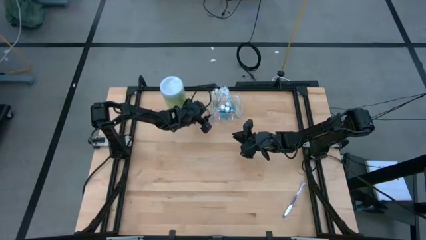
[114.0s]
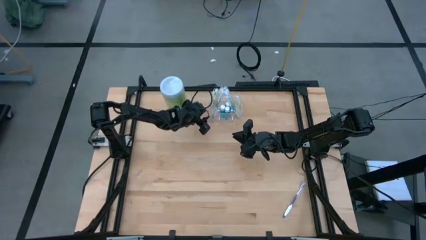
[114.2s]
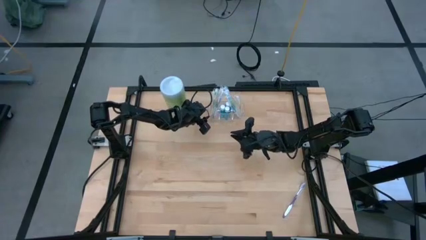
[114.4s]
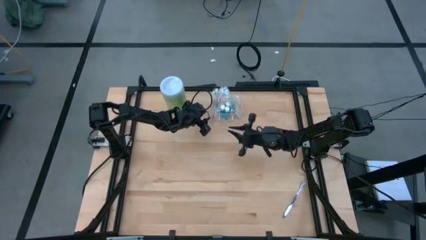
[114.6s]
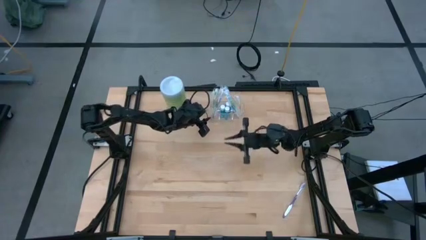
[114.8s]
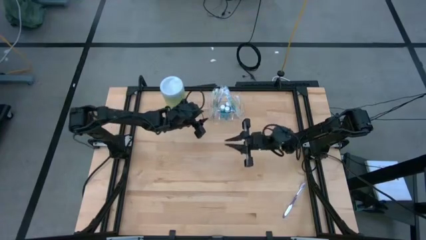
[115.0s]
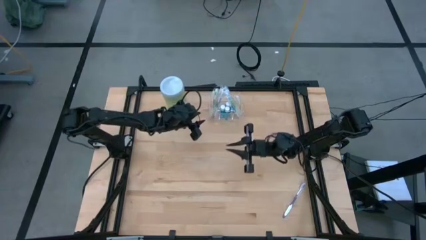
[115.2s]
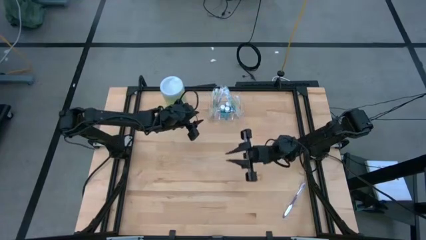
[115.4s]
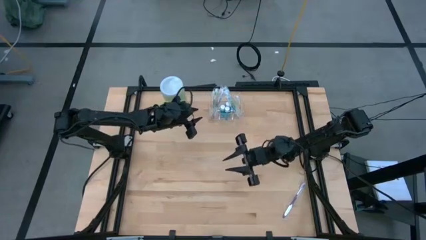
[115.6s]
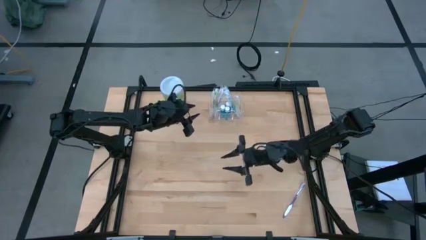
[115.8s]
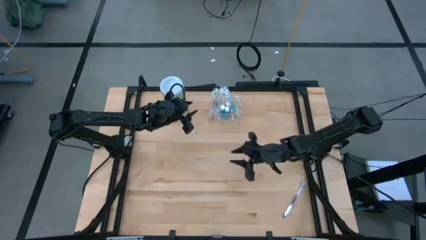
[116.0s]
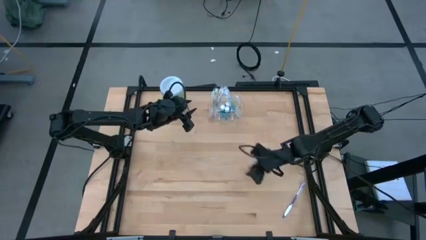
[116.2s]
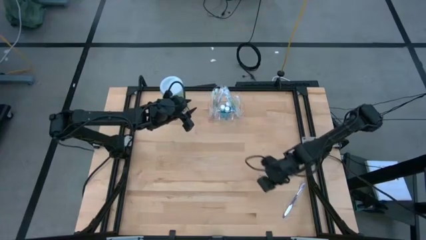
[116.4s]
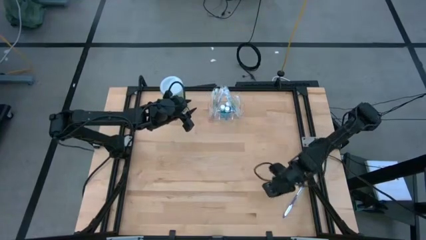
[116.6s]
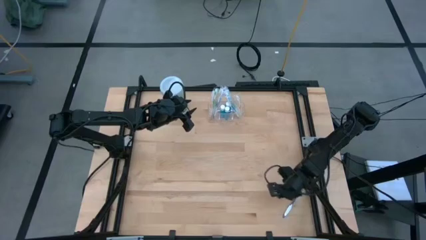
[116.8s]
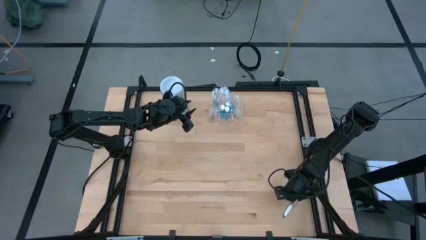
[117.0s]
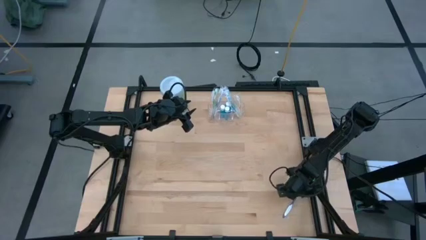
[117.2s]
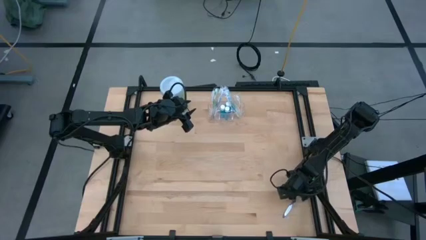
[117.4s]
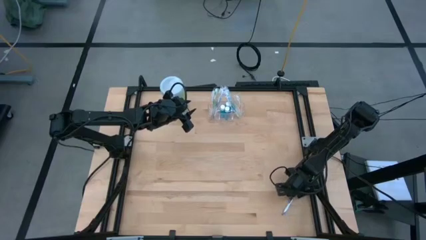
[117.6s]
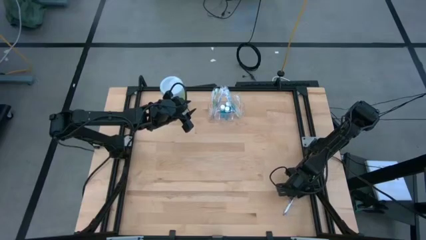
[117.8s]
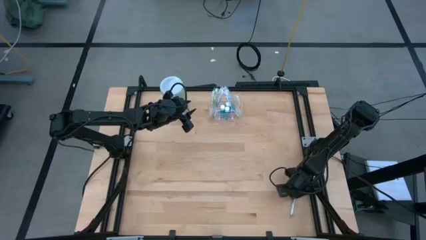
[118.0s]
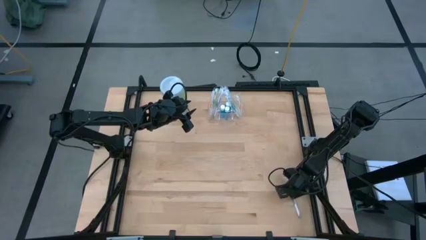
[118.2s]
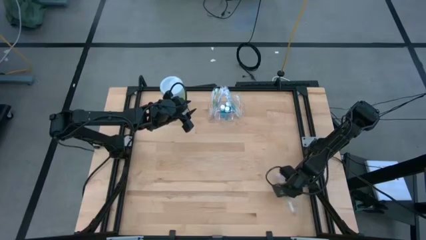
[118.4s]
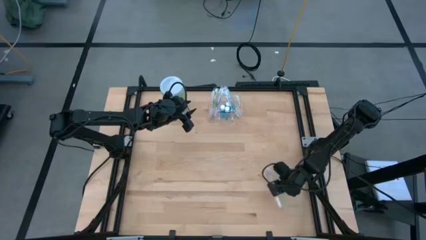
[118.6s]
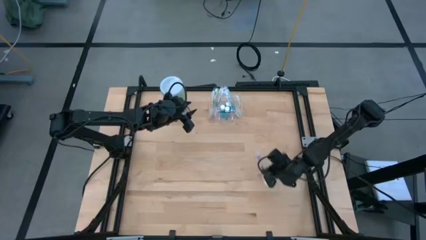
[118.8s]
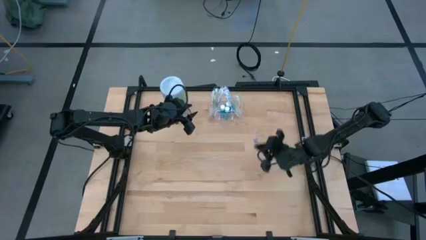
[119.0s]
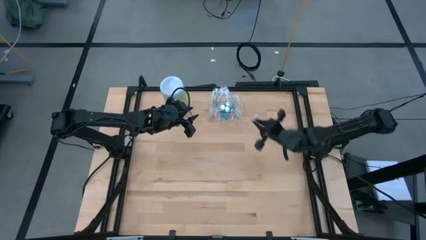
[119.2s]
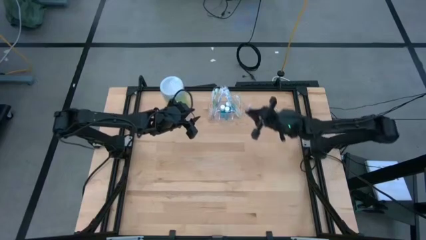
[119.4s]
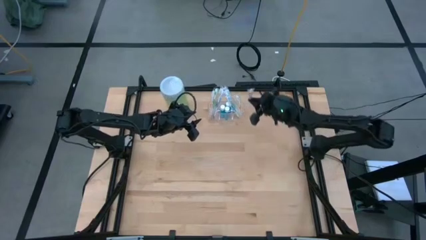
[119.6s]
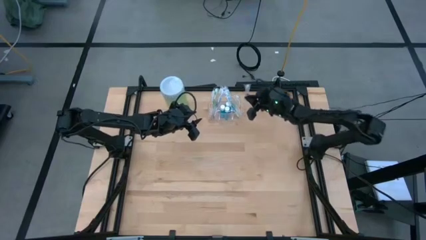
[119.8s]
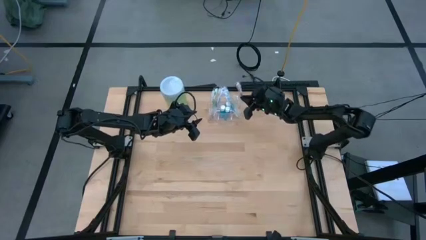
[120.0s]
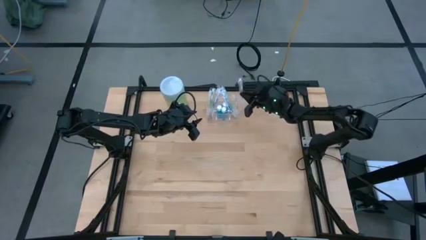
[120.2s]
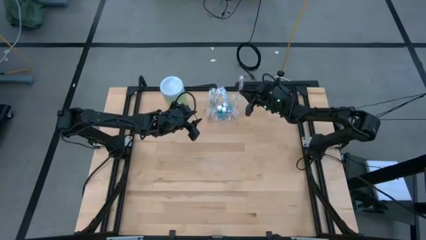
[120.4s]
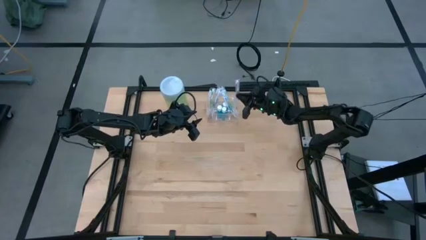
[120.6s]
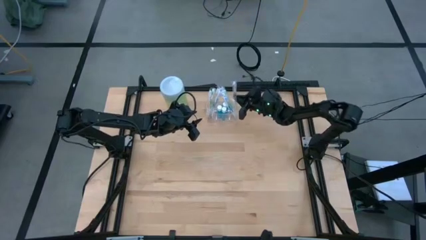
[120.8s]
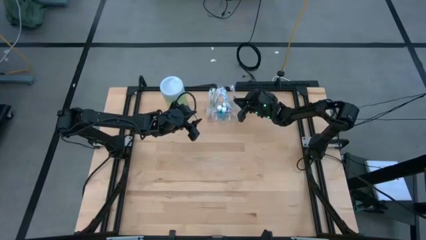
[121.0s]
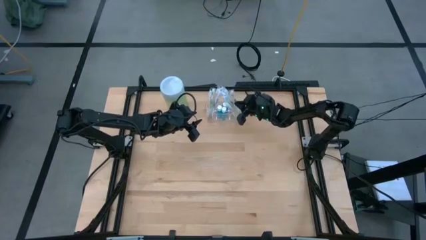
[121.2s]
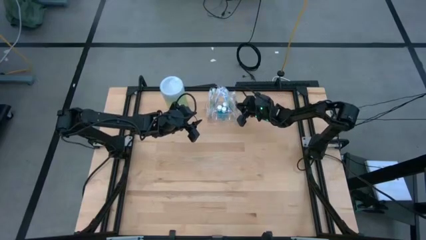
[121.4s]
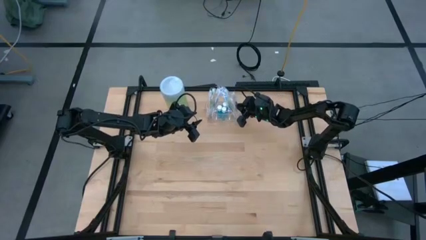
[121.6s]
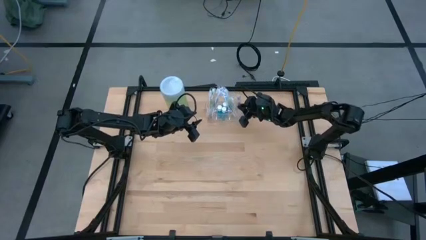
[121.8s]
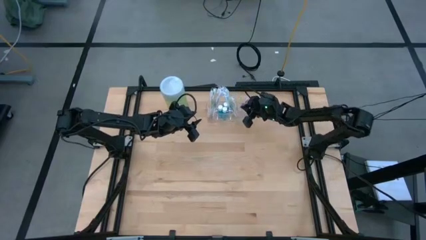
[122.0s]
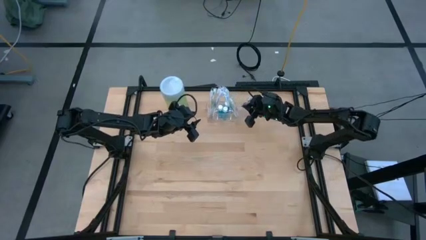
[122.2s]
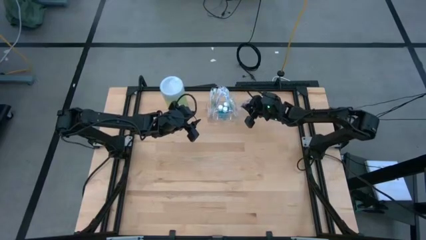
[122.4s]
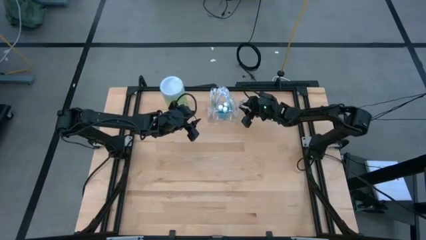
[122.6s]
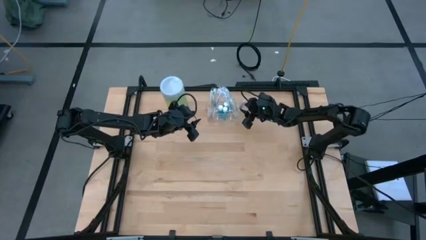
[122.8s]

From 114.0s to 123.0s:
Task: Pick & Place toothbrushing station
Put the purple toothbrush into the transparent organizer

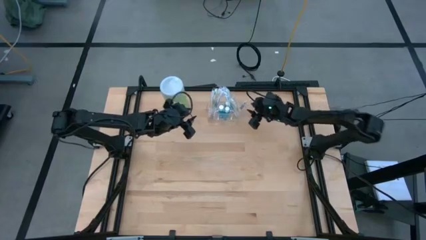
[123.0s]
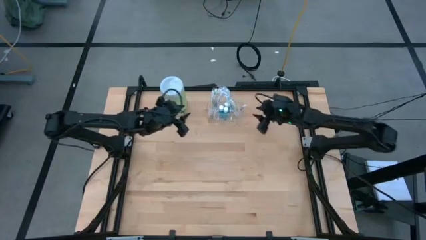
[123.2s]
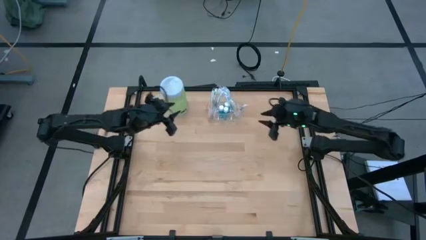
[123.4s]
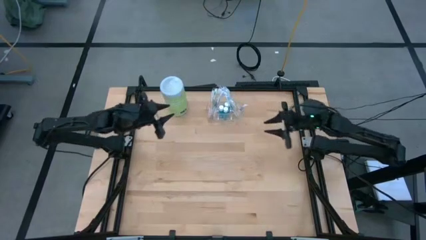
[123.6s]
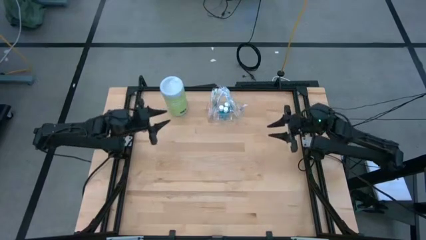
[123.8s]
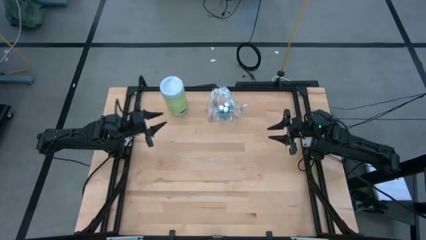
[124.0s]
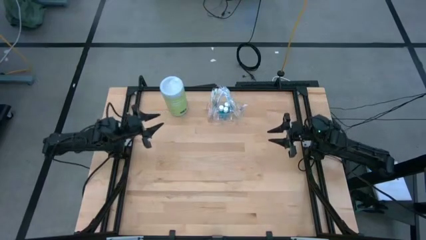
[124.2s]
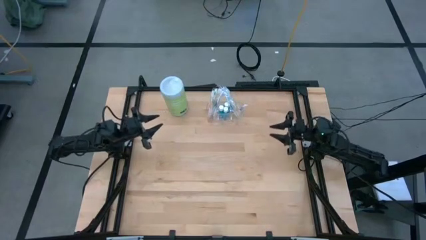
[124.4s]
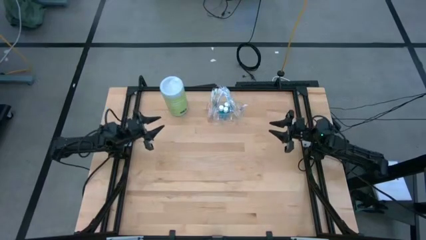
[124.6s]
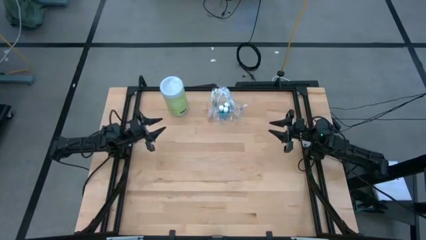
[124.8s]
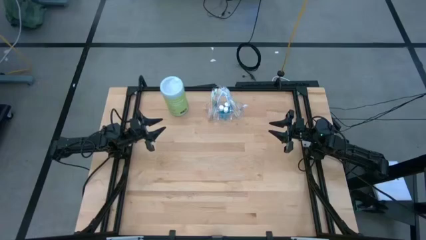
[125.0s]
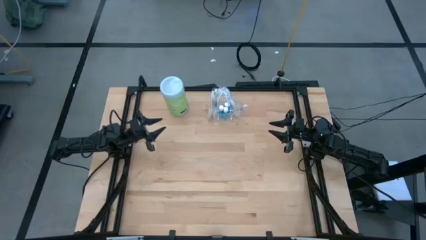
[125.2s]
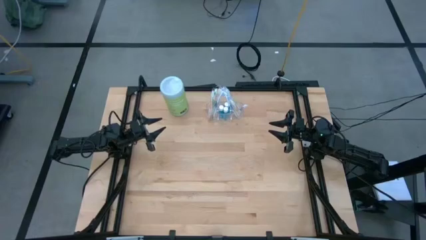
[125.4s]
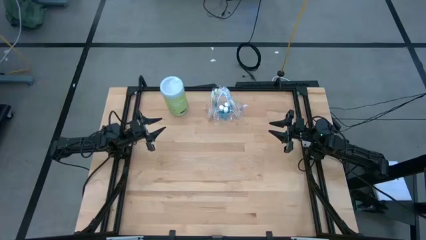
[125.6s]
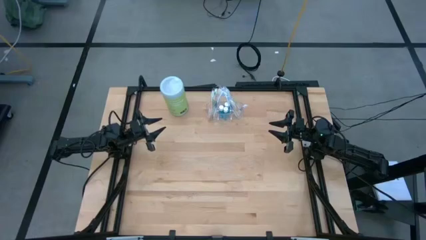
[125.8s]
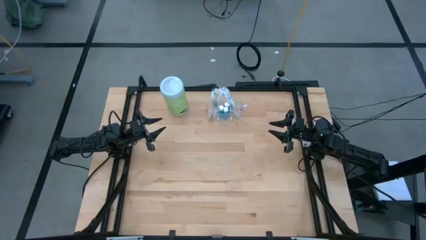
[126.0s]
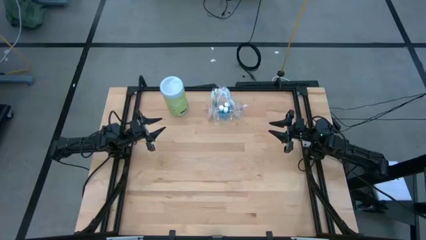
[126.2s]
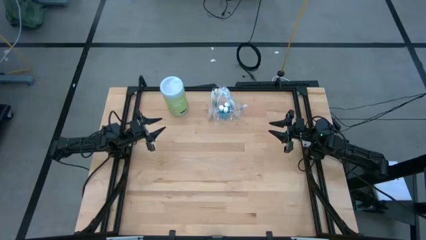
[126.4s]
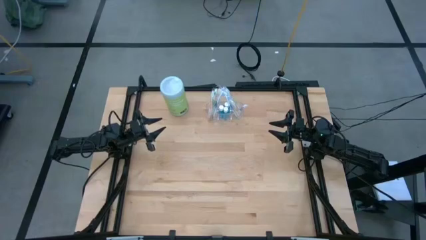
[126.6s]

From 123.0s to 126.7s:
Return to Home Position

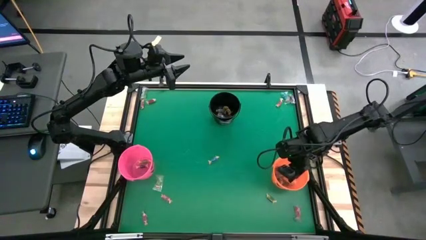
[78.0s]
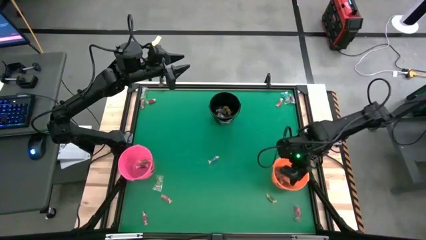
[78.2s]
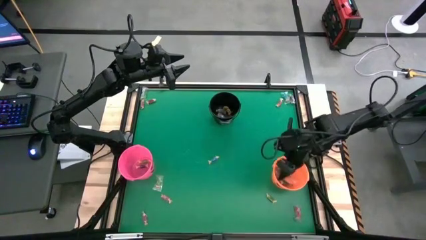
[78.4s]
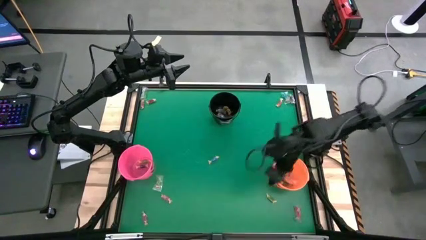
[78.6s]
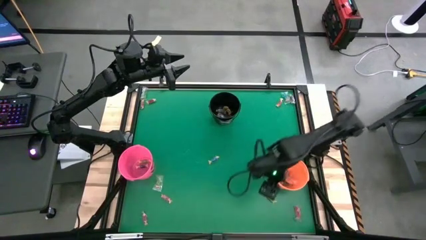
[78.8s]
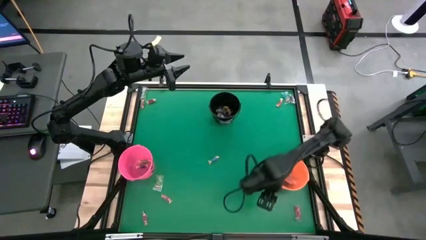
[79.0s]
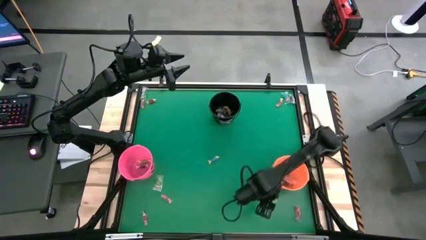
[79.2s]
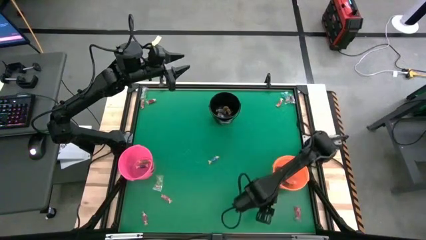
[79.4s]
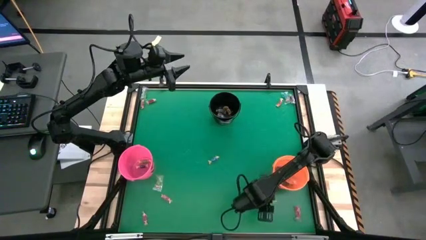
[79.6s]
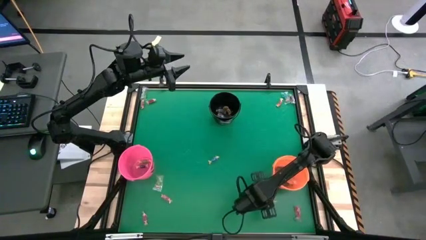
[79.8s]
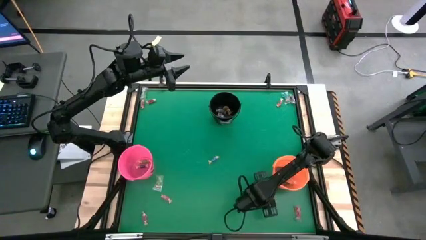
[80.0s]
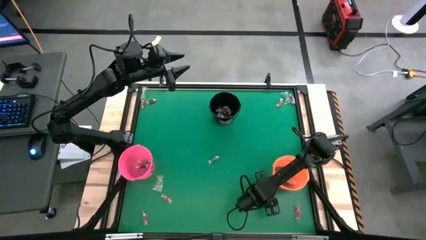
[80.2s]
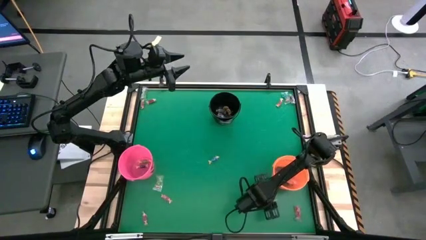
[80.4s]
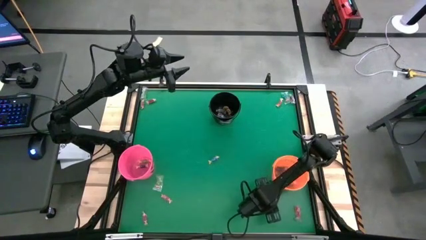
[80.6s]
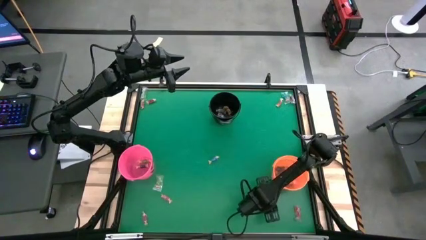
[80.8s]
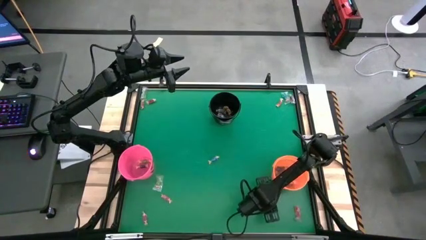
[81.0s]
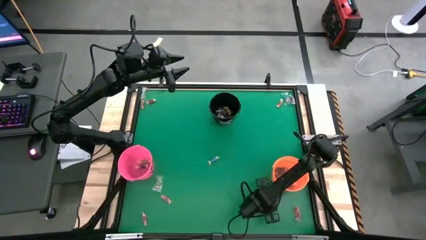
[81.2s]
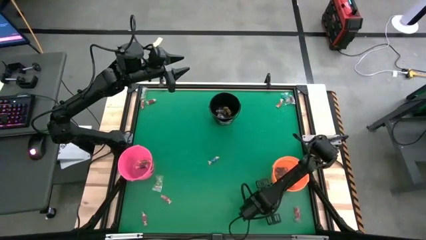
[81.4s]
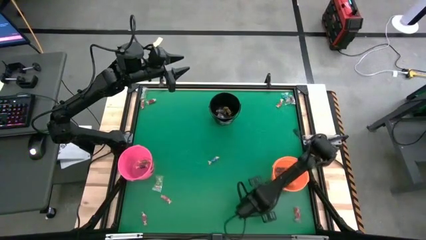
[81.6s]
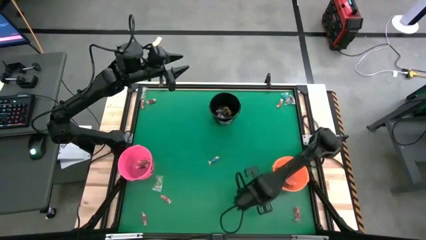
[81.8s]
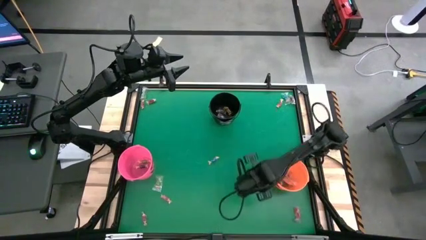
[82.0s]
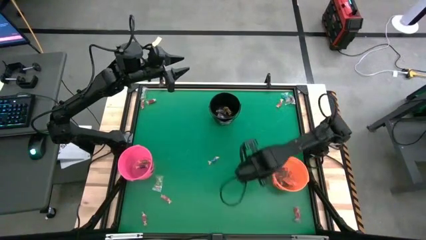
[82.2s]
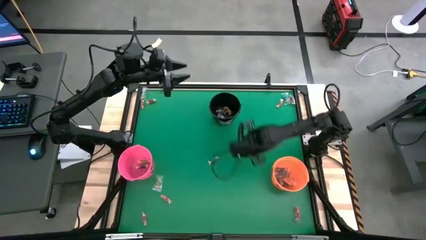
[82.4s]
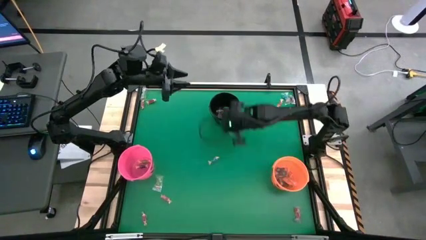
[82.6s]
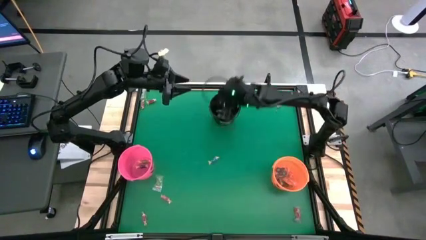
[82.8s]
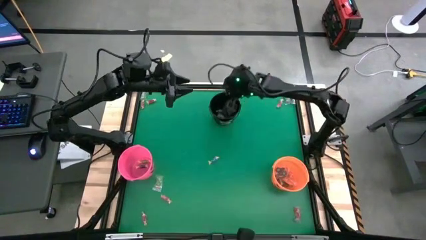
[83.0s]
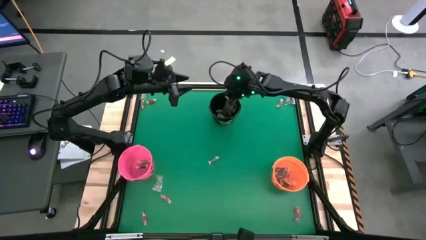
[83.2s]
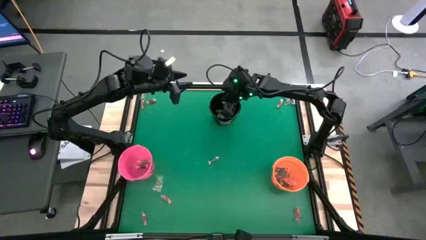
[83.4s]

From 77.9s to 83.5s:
Task: Sort candy by brand, put in halloween buckets
Put the green candy into the black bucket
